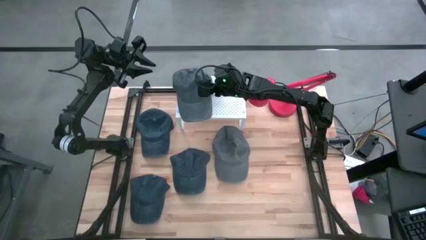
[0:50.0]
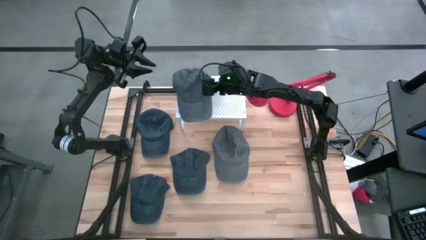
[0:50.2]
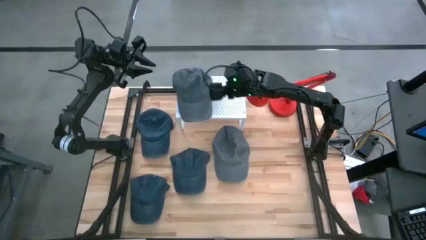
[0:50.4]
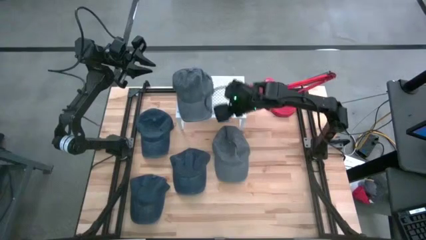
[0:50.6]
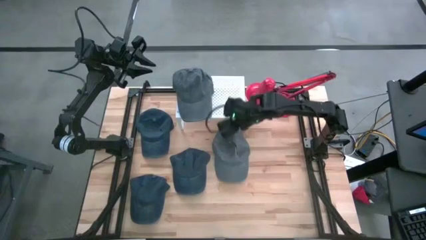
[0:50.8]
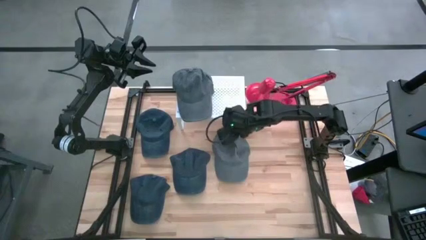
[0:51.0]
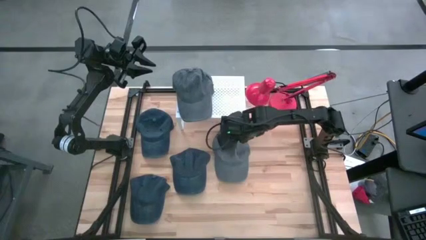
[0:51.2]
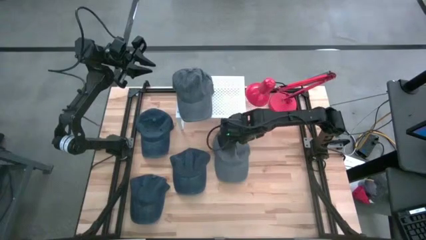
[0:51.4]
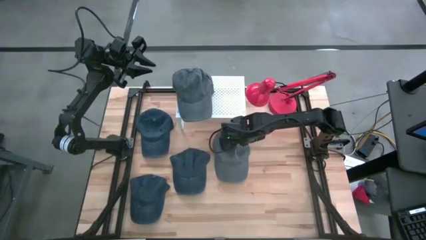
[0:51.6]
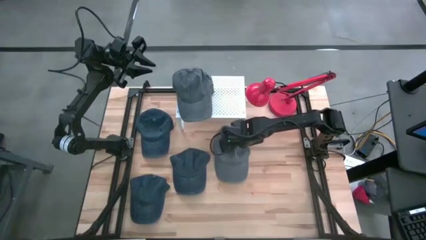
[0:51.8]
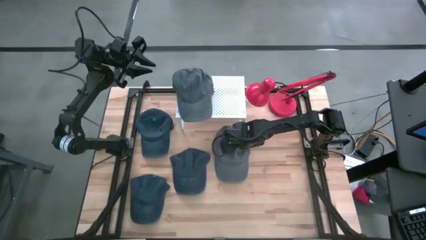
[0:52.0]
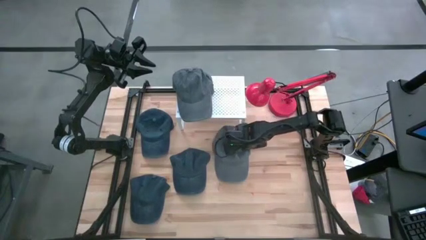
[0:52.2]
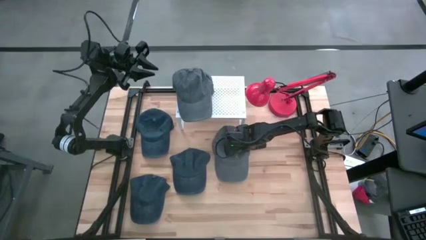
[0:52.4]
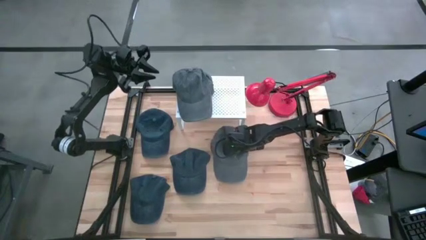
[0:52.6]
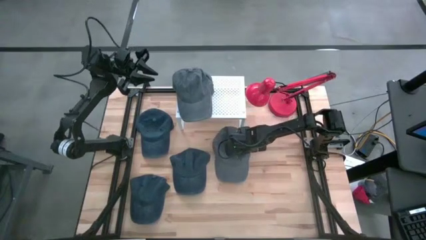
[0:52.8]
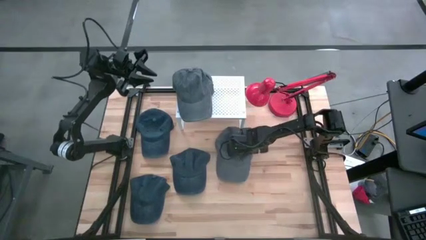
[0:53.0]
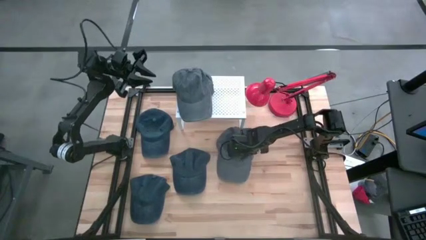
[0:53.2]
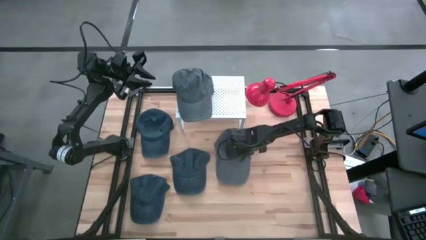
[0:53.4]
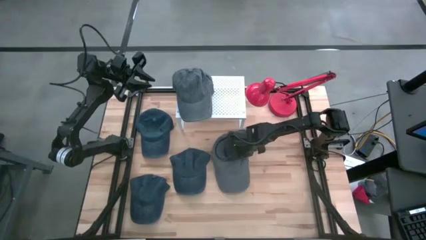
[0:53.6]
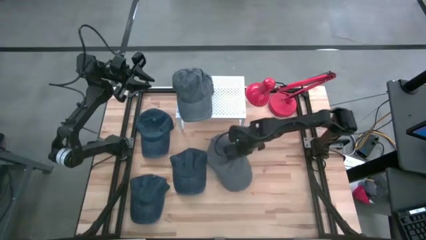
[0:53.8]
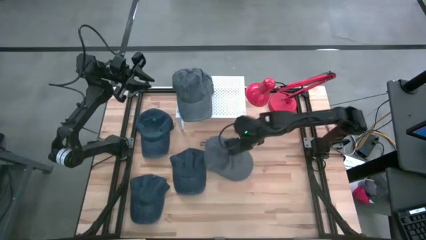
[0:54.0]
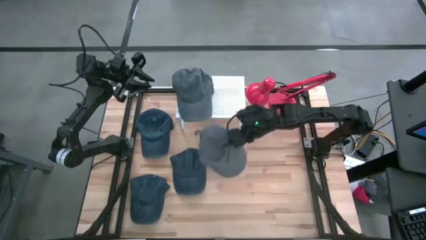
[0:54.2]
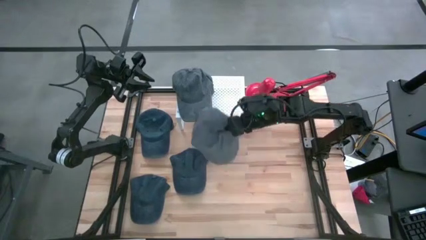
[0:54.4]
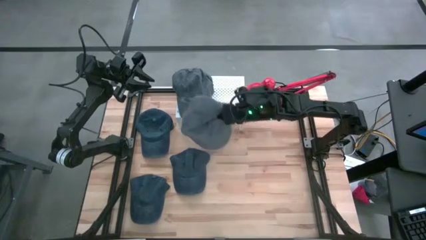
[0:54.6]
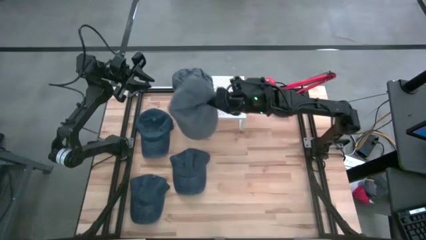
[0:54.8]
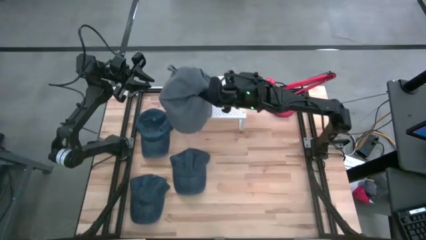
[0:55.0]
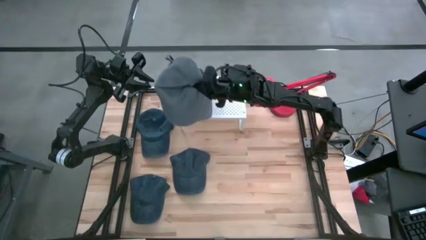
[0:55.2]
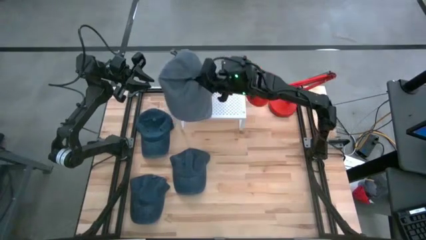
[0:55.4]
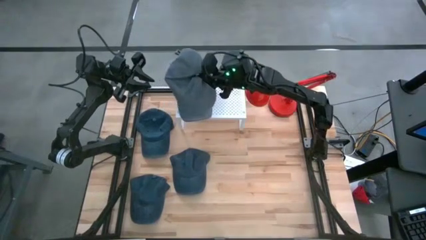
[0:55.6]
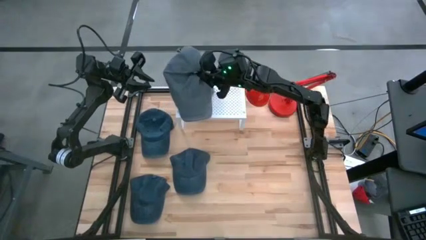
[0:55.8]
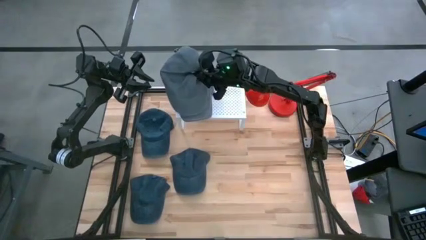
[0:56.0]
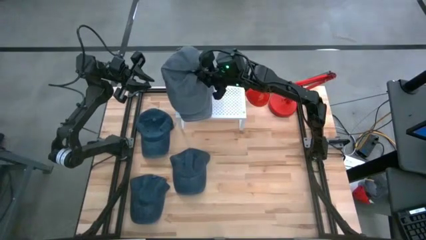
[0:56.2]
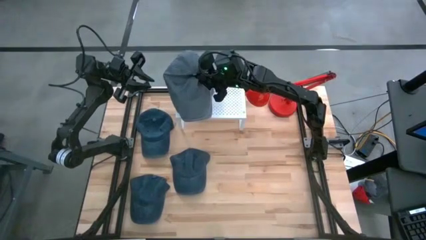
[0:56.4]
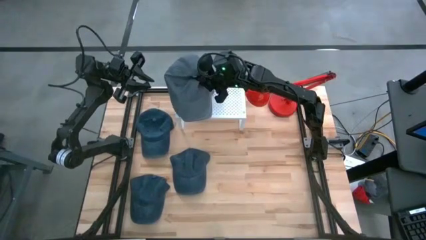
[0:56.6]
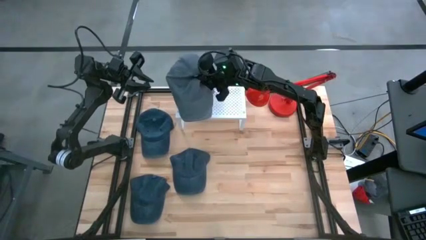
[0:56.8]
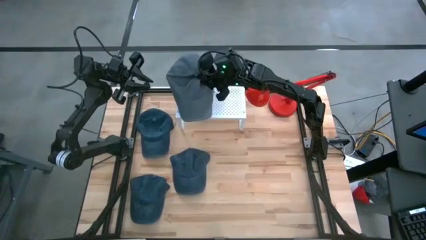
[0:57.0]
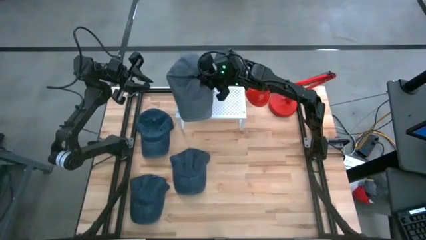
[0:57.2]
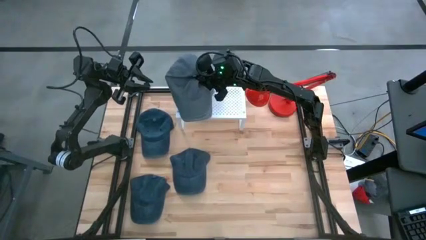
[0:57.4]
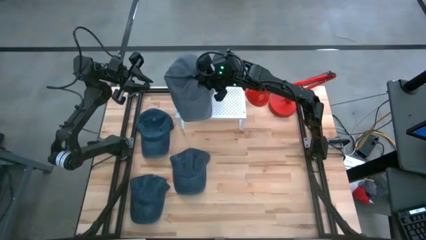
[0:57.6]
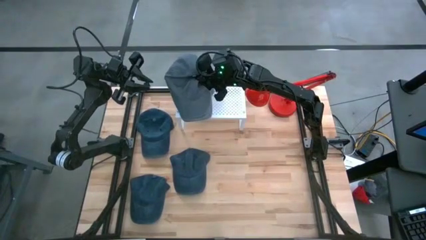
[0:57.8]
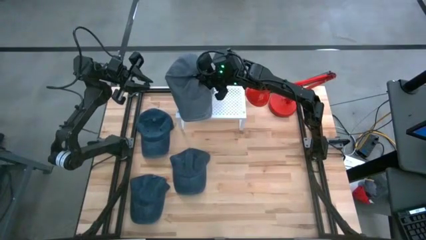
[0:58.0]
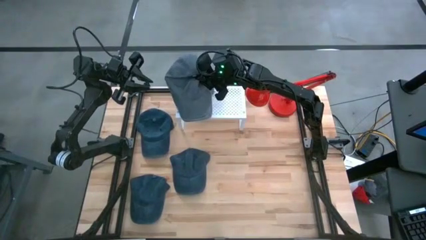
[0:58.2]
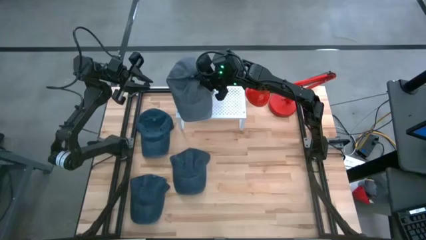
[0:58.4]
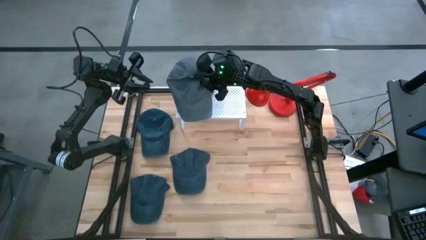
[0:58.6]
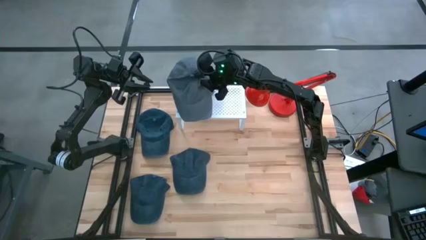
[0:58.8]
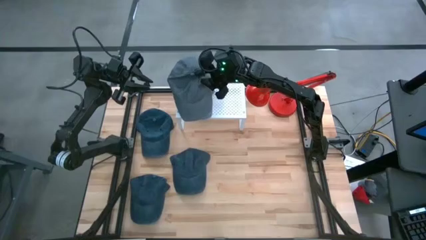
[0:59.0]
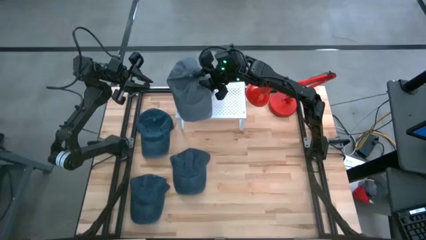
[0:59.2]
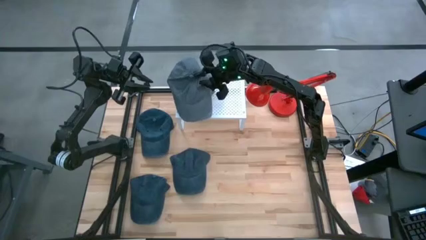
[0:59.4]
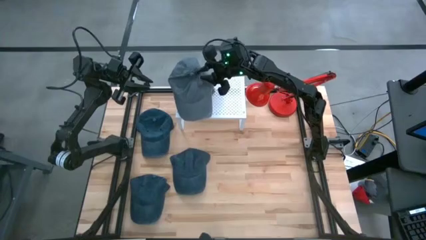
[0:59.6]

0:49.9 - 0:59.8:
Task: Pick & Place hat
Stack the gray cap on the gray cap on the shelf
